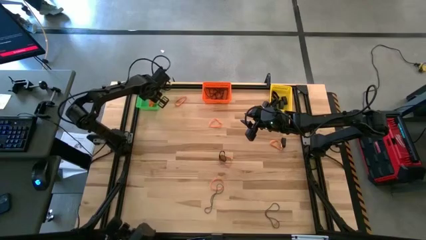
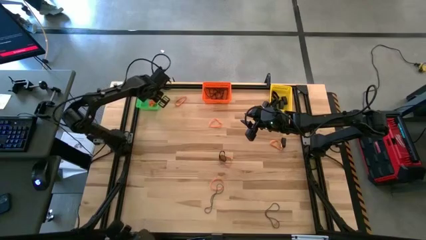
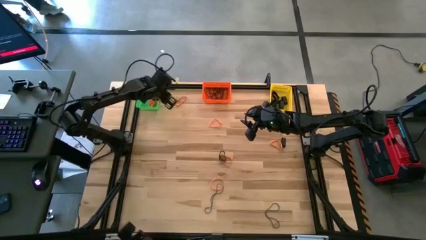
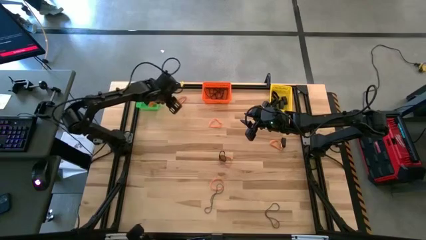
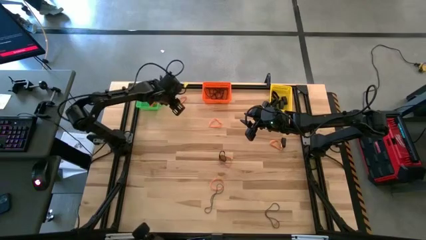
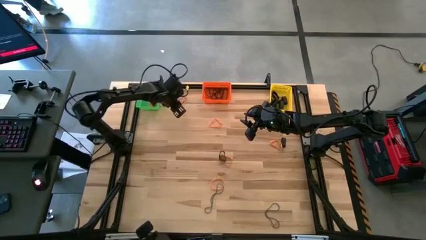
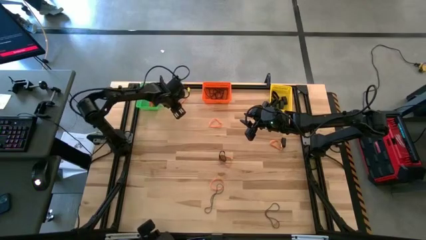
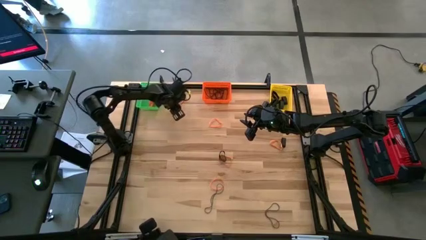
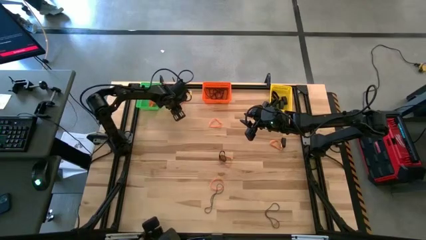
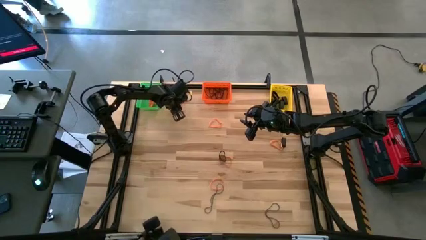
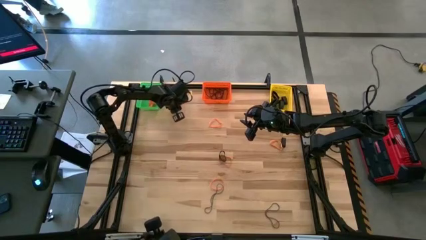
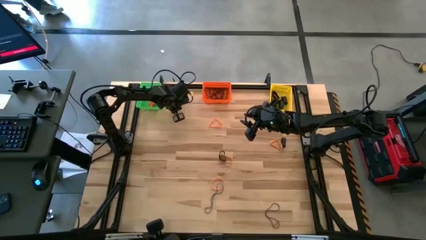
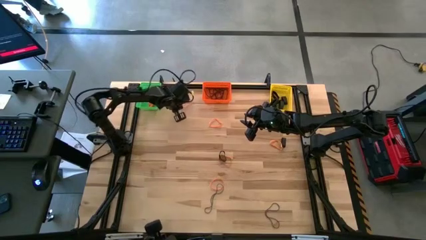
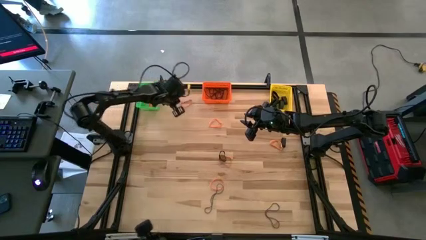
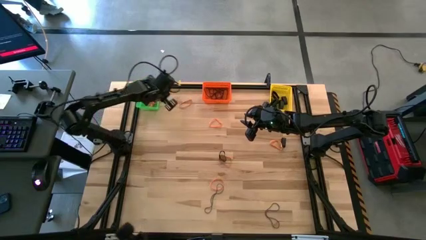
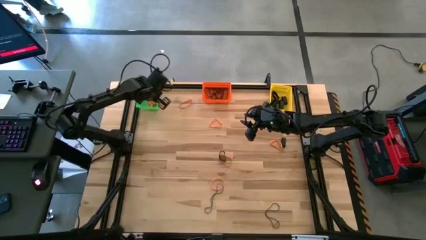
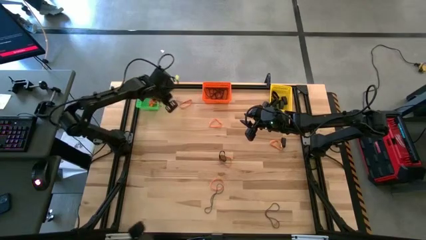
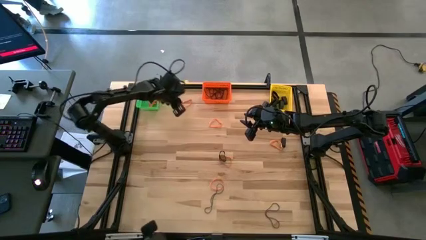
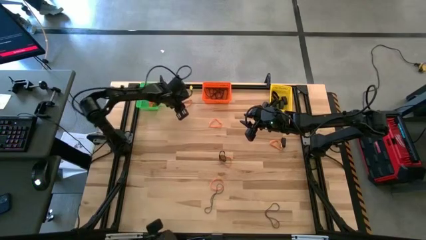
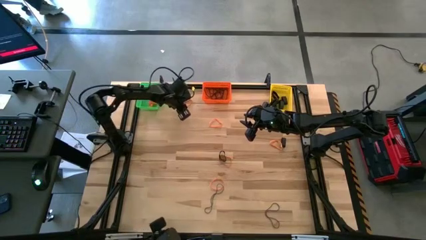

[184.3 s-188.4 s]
Task: Sort rubber bands into baskets
Put the top left orange rubber band into the green bin

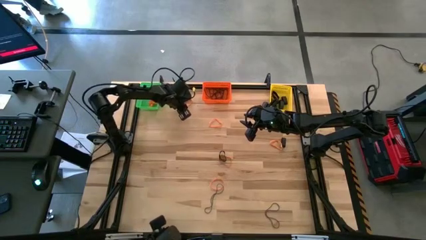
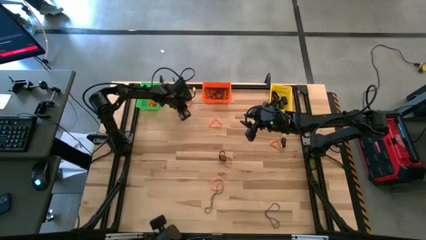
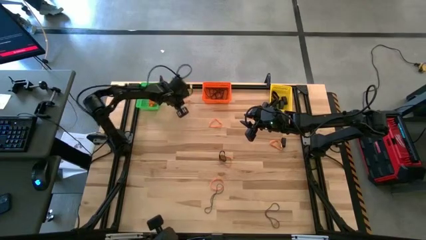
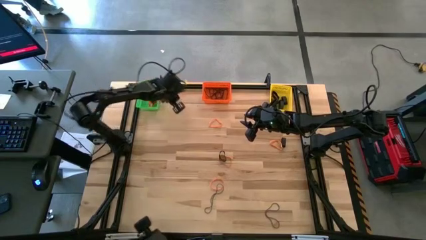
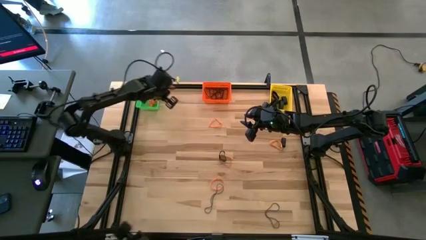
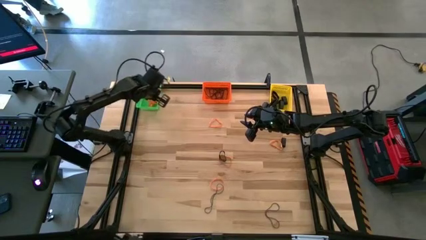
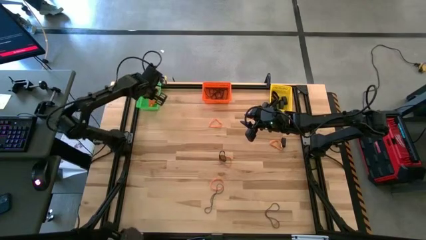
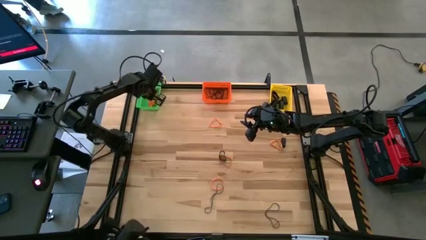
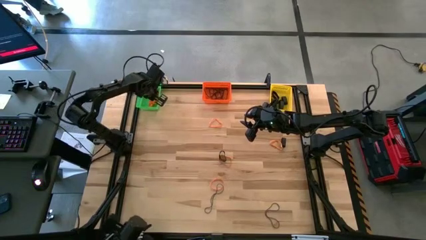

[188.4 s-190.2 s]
Put the top left orange rubber band into the green bin

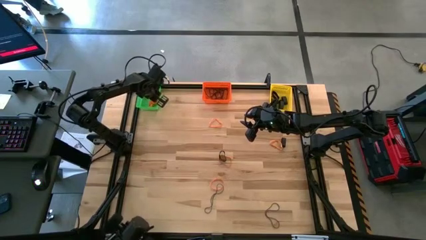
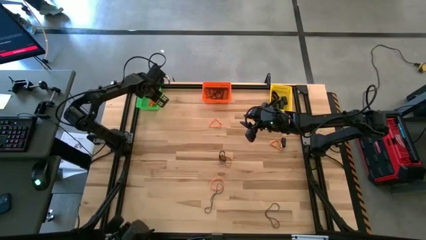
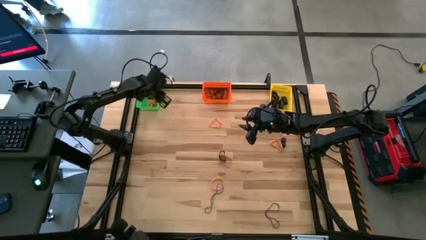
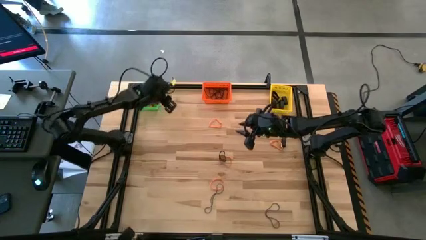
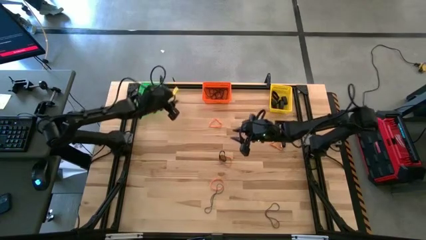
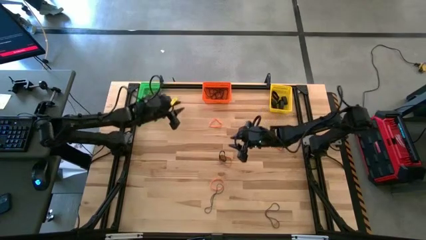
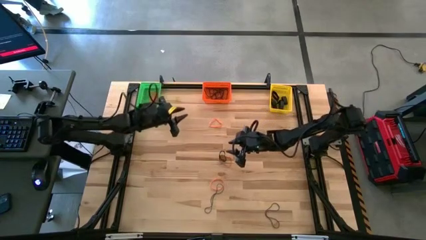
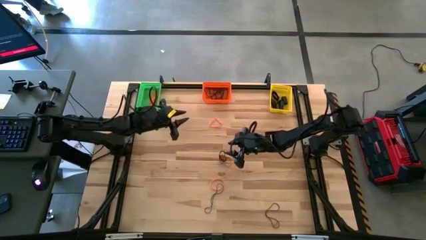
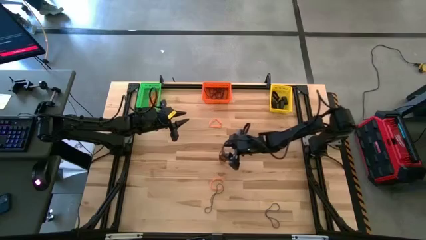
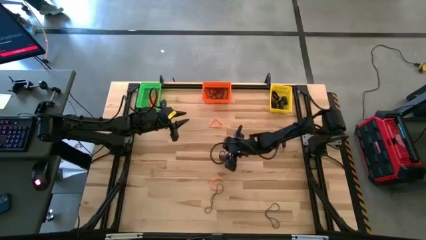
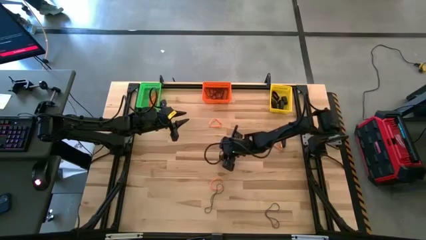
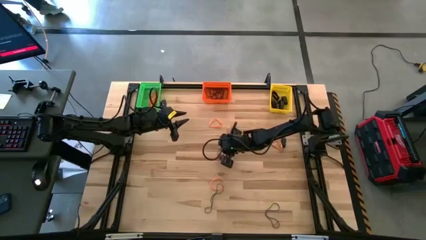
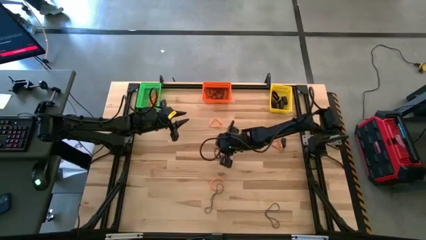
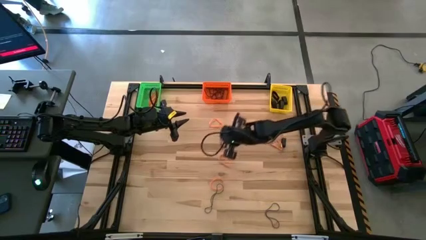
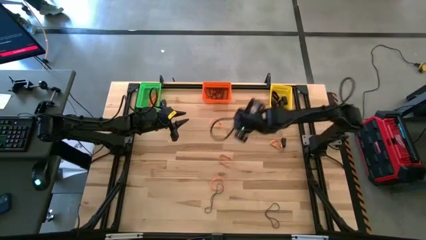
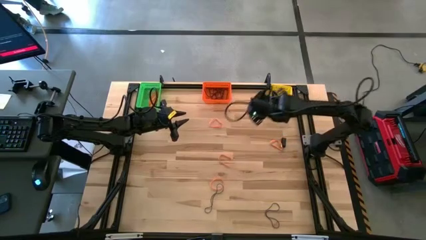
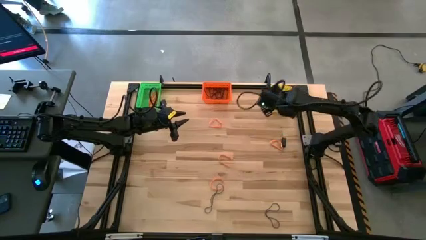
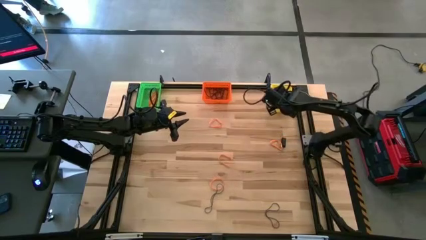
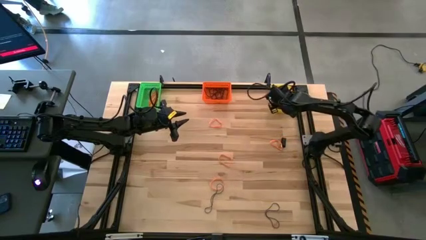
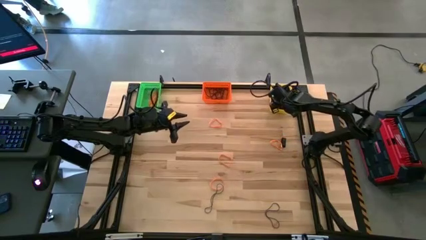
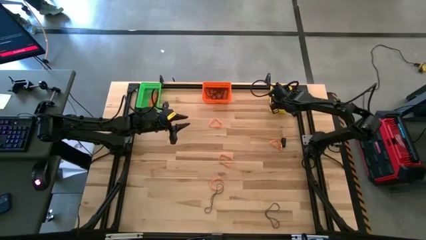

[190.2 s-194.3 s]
Put the left black rubber band into the yellow bin

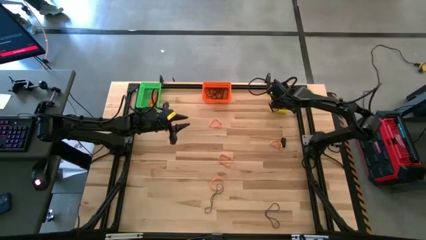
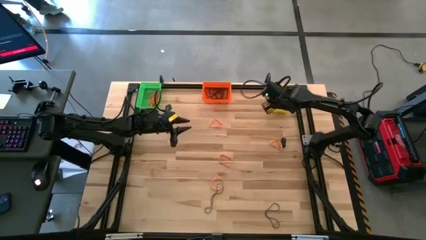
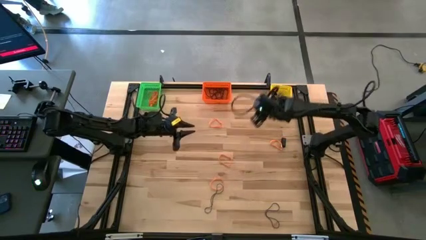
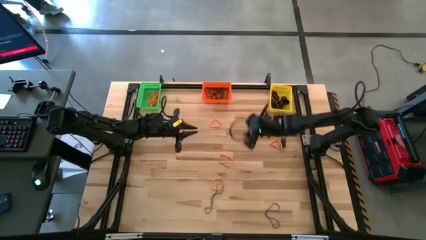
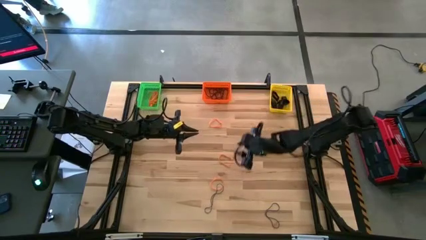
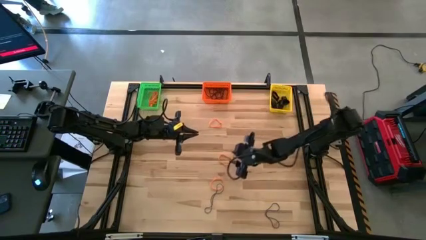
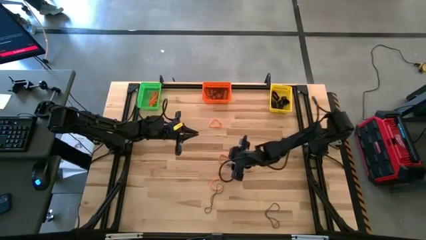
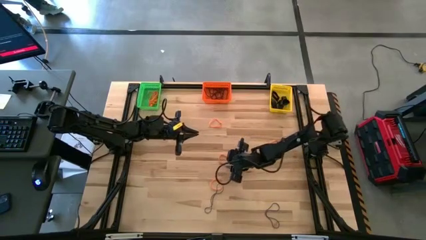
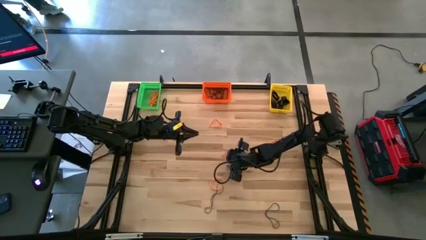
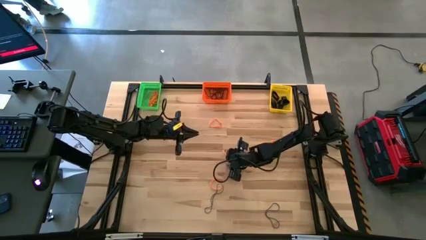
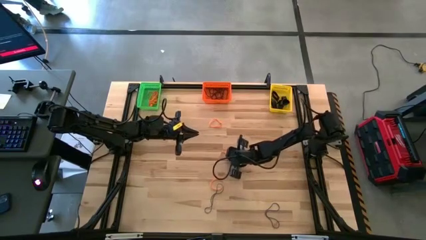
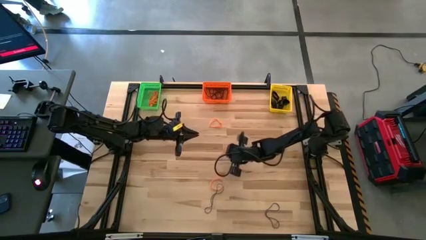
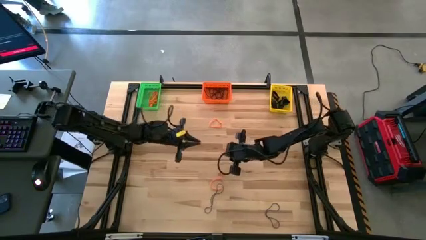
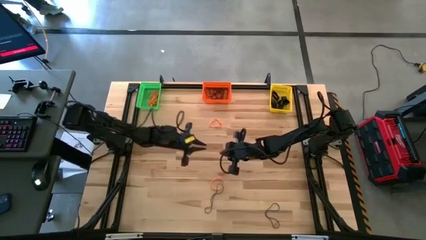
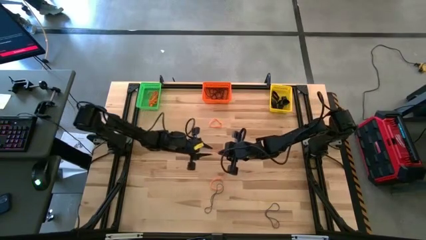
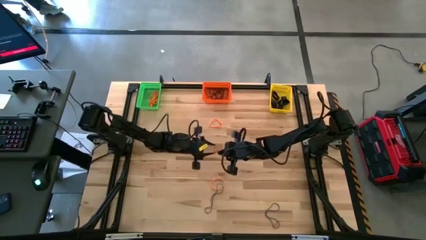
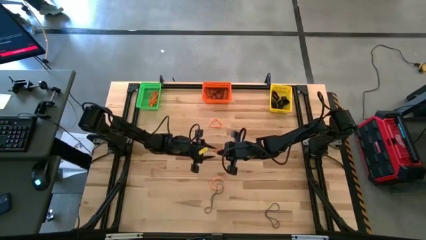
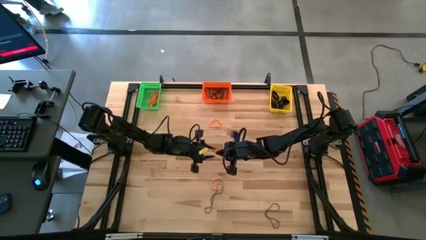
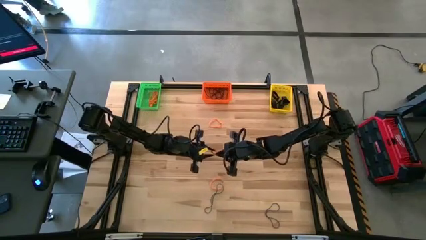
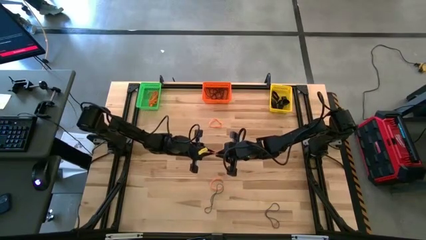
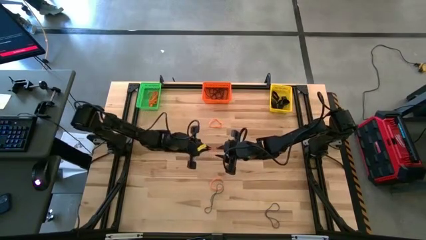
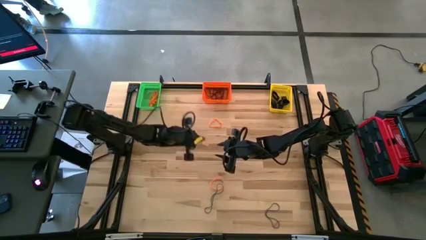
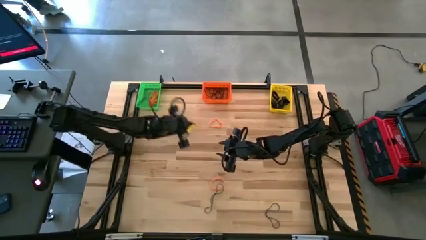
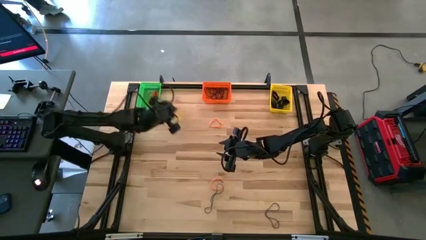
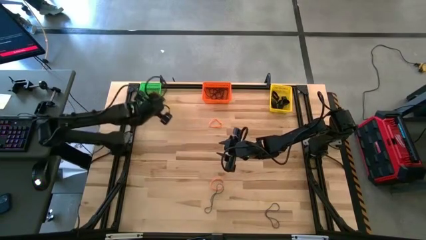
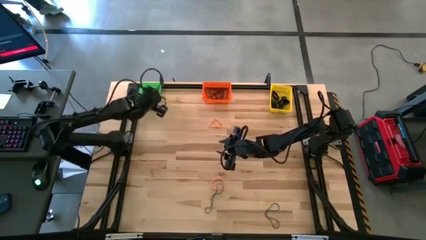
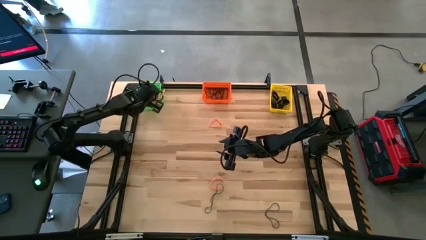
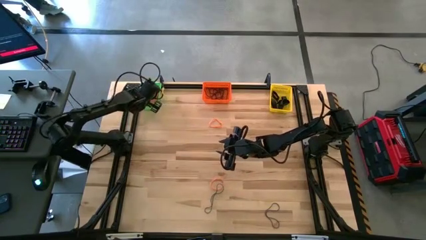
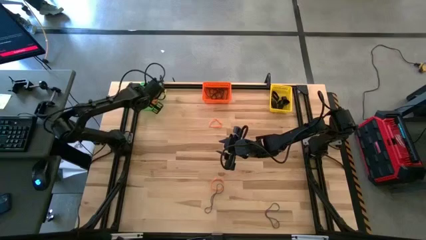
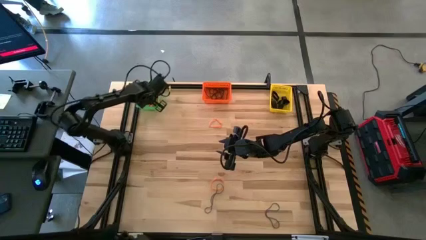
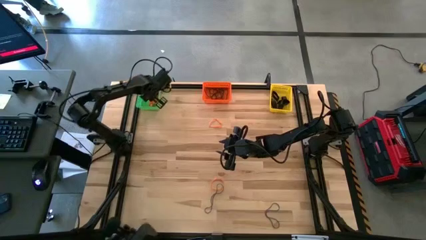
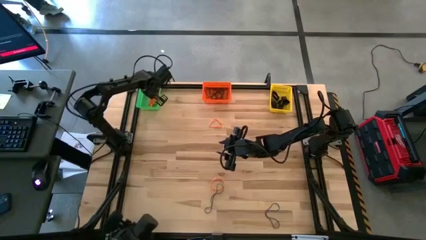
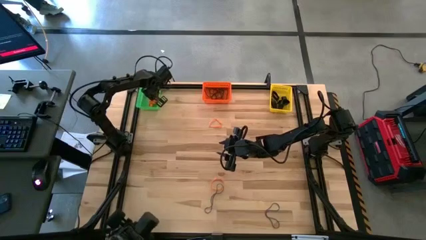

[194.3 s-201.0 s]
Put the middle left orange rubber band into the green bin
